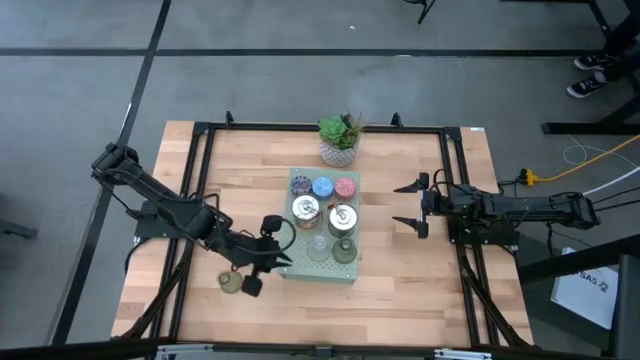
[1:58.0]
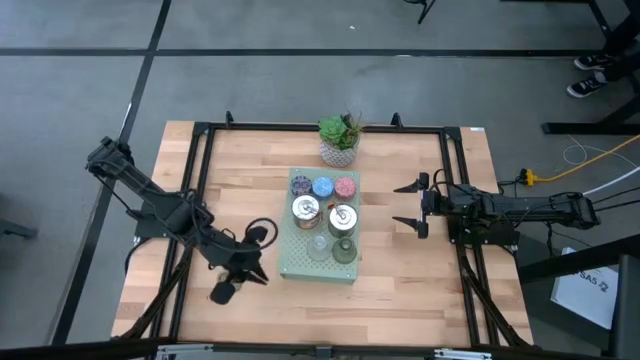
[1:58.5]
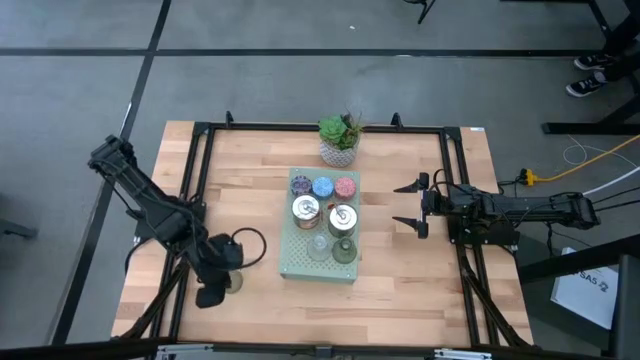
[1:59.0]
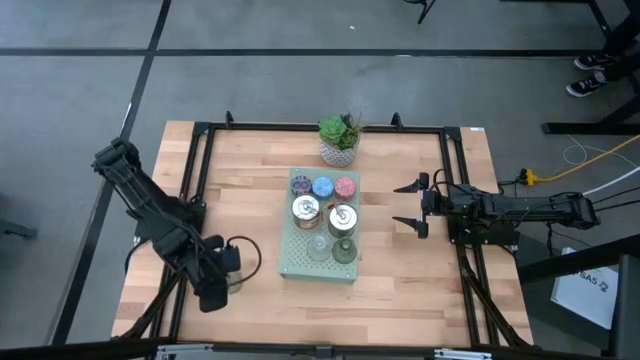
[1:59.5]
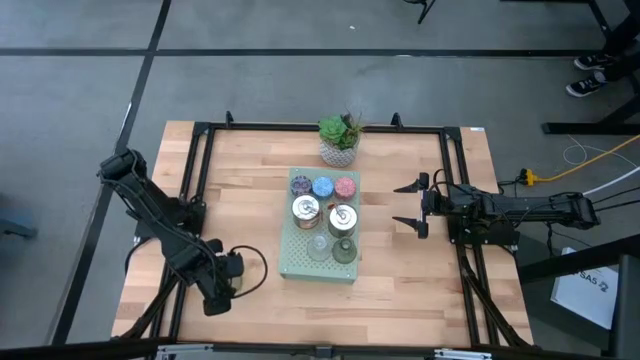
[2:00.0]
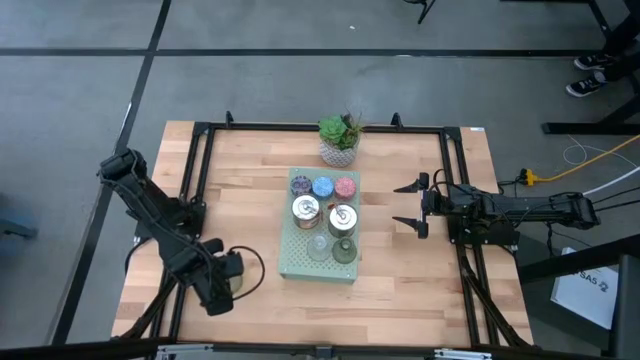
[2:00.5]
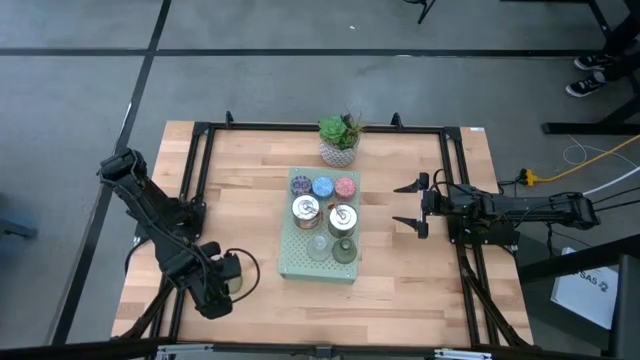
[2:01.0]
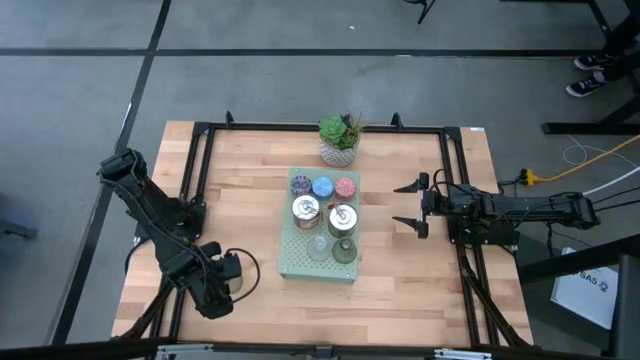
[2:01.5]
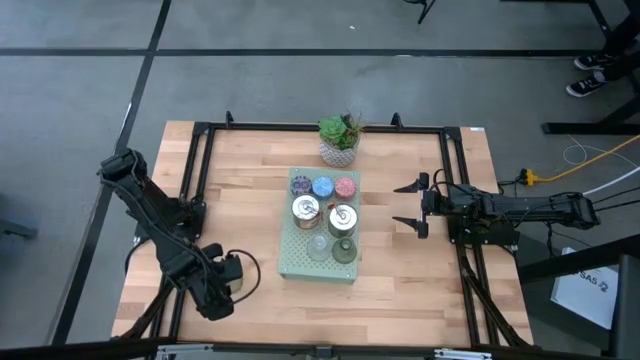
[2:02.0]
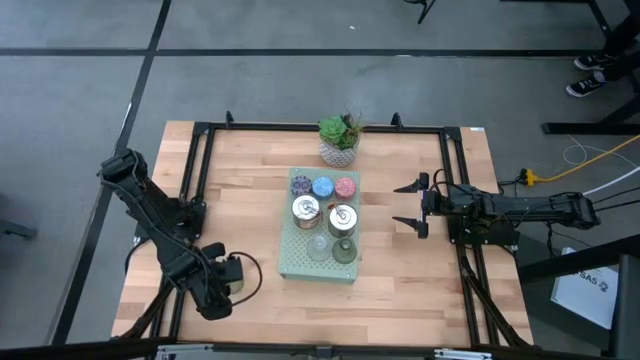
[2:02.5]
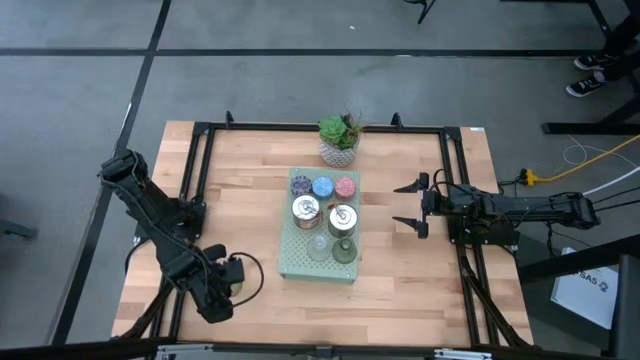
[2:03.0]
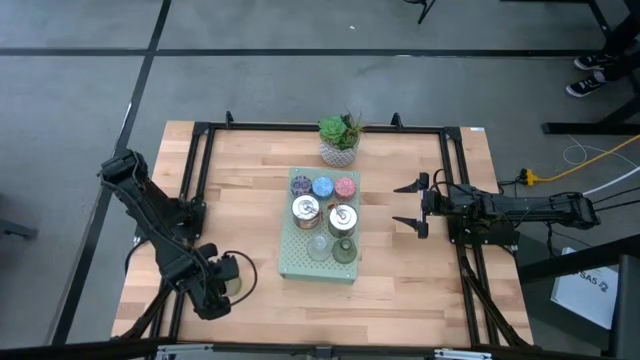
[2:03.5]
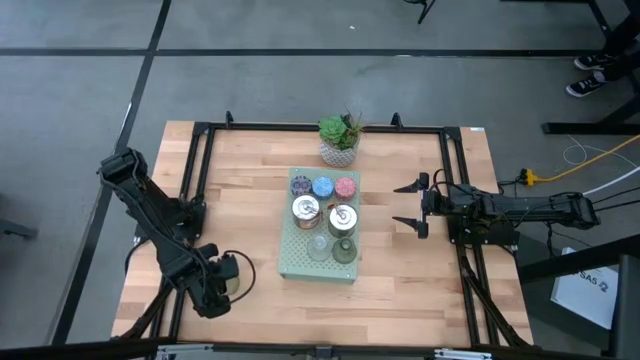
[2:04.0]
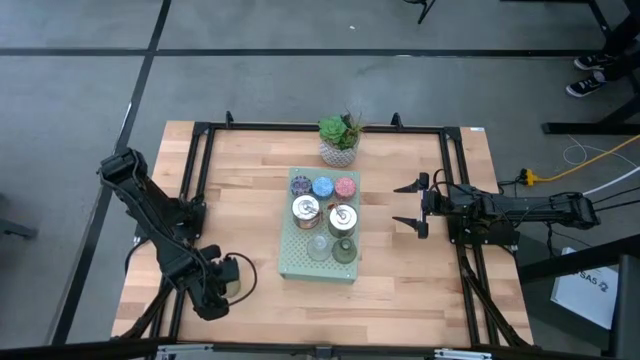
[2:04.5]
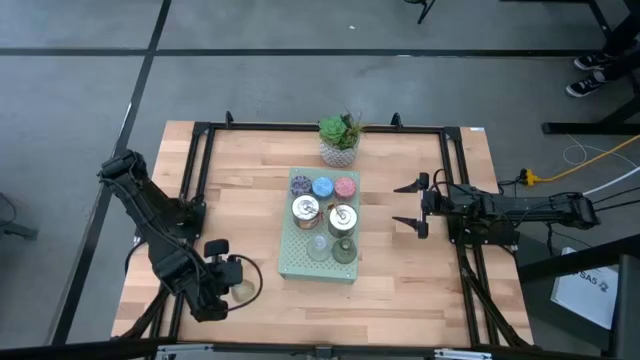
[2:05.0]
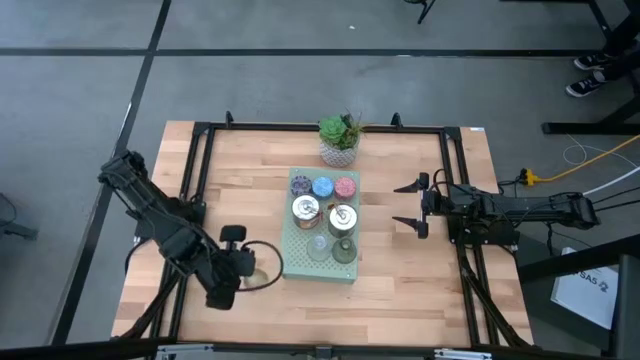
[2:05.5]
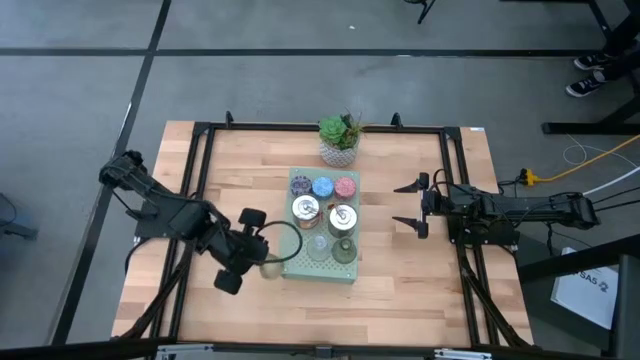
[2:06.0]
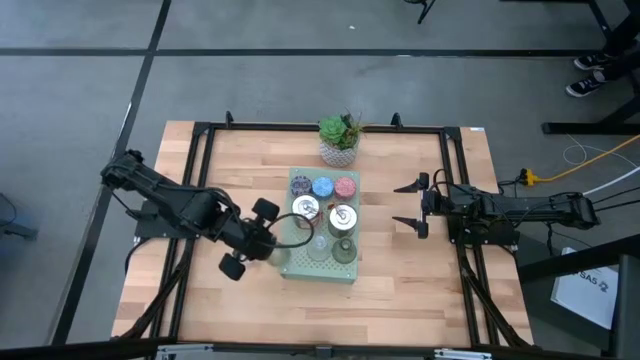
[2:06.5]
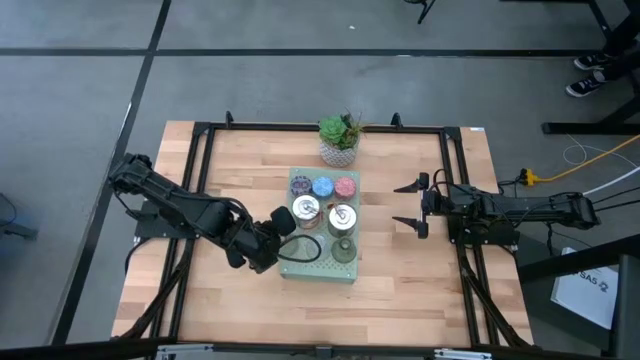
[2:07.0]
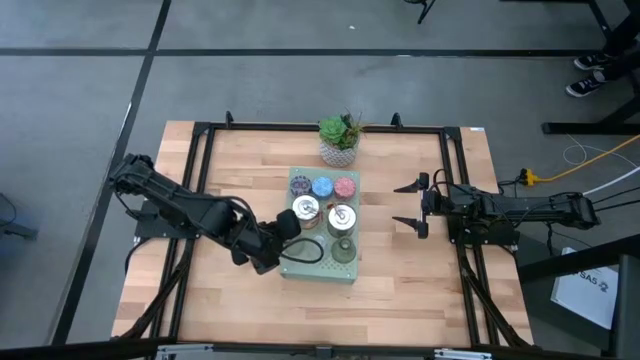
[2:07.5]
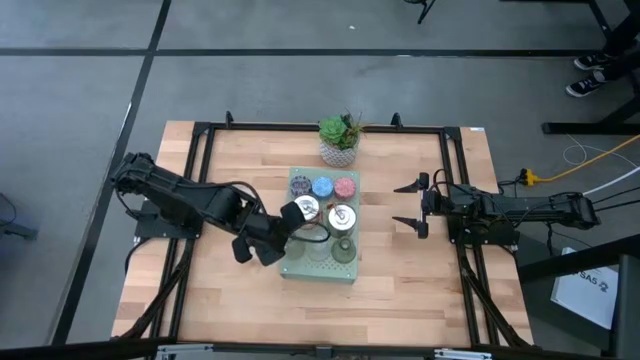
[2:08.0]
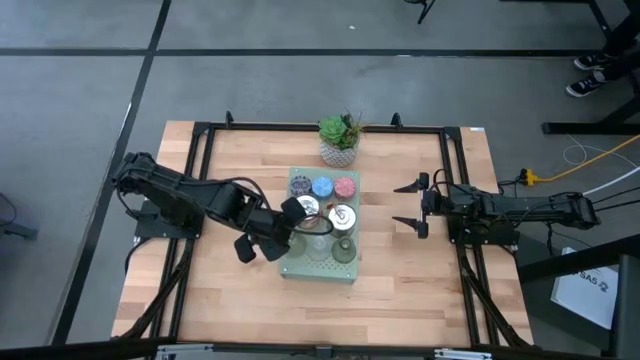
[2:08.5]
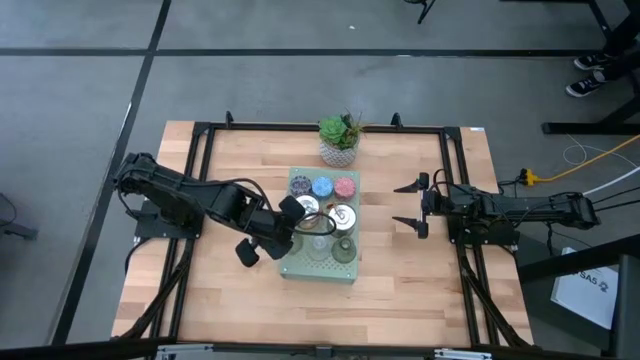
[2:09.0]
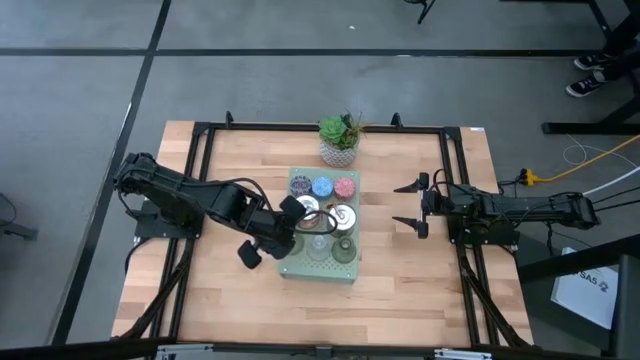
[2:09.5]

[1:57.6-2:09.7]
Task: Pick & Place candle stick holders
Put the green vase candle holder on the shelf

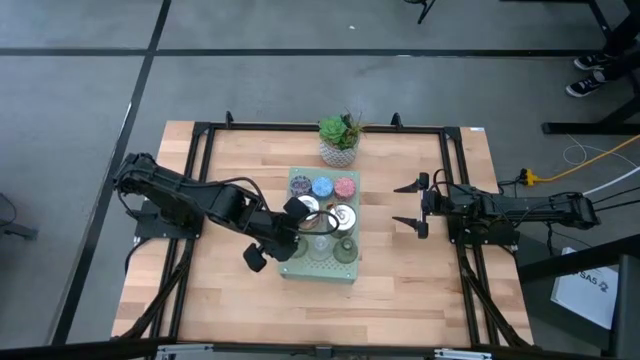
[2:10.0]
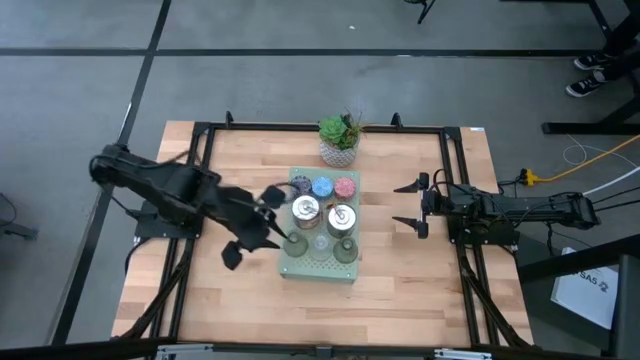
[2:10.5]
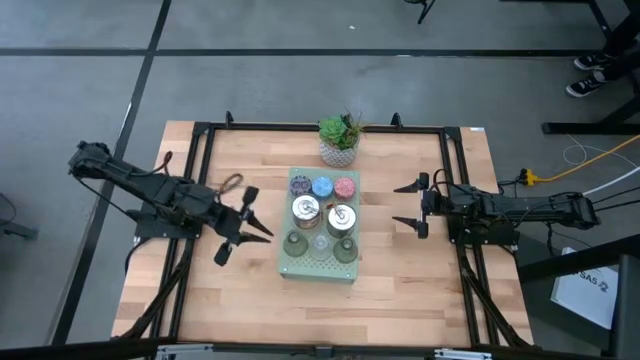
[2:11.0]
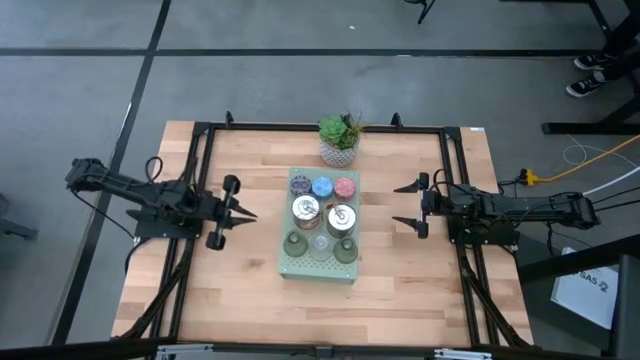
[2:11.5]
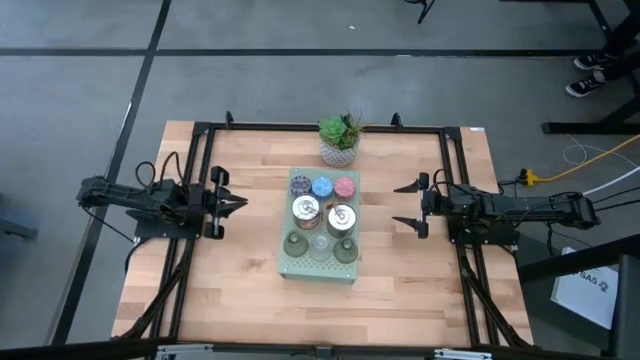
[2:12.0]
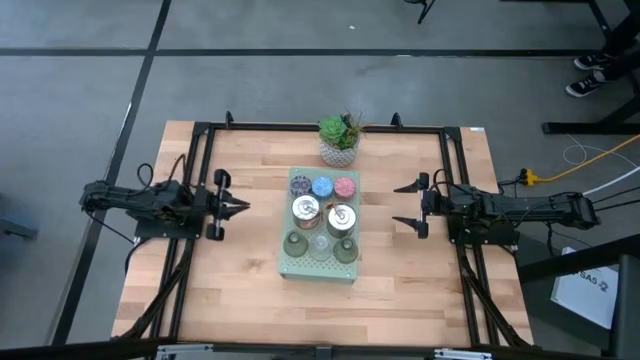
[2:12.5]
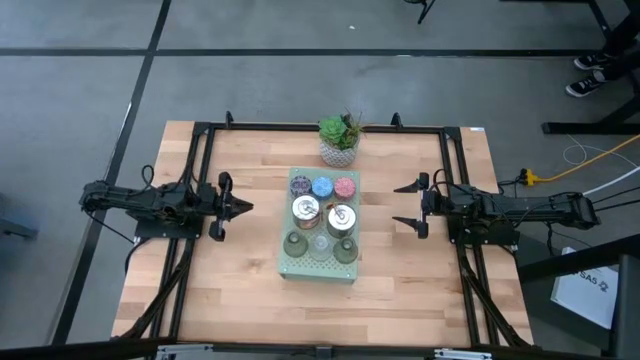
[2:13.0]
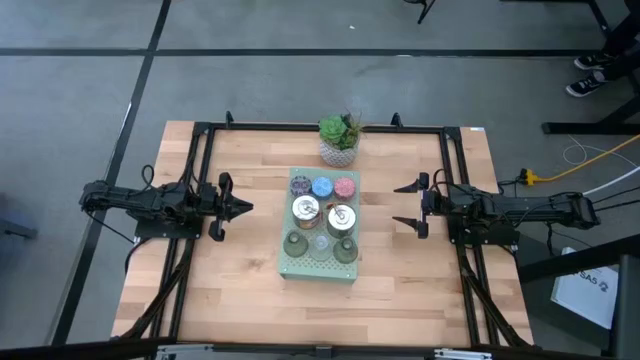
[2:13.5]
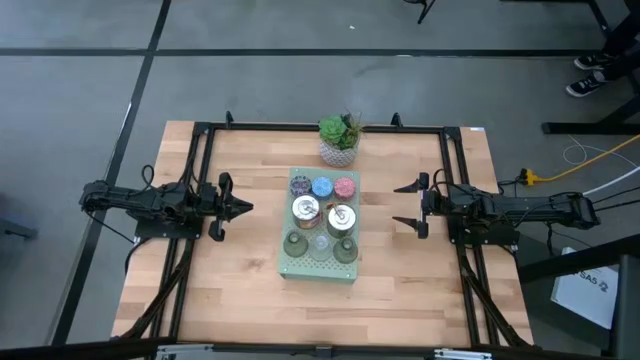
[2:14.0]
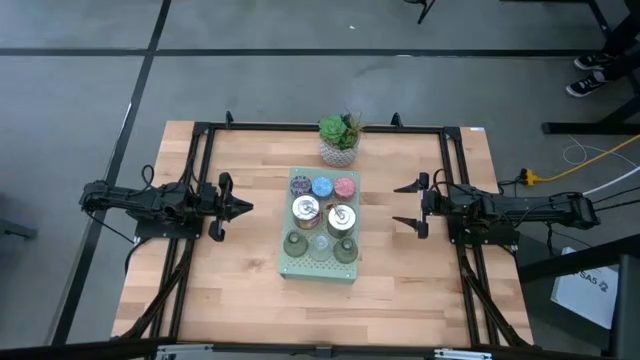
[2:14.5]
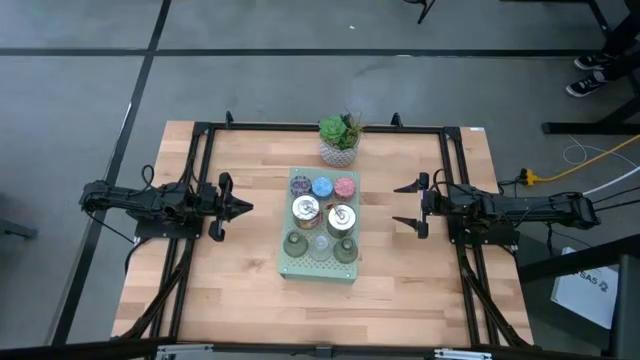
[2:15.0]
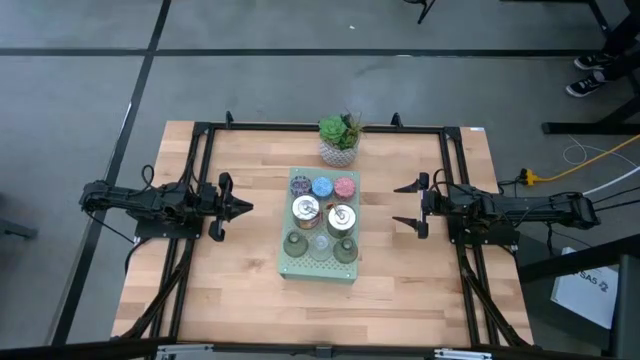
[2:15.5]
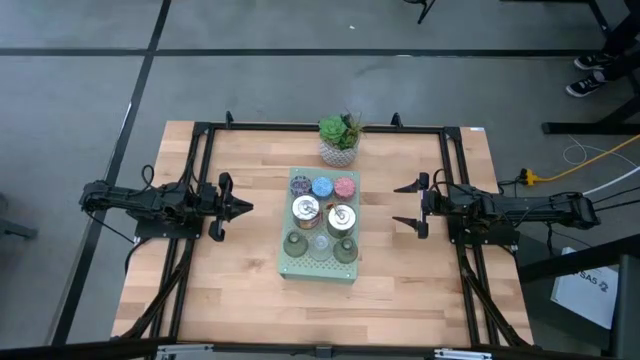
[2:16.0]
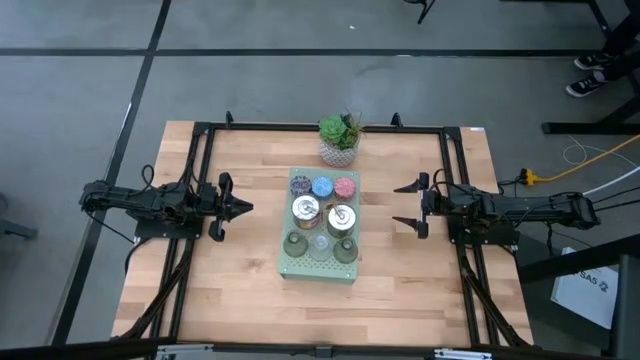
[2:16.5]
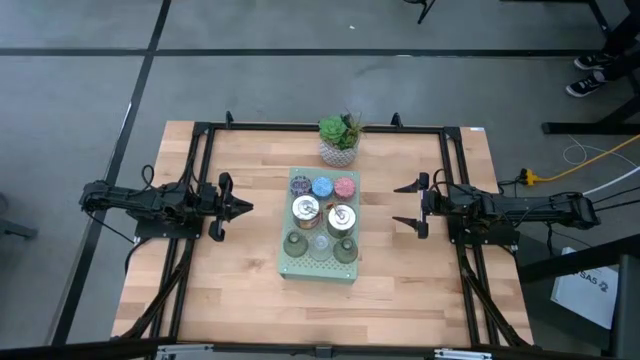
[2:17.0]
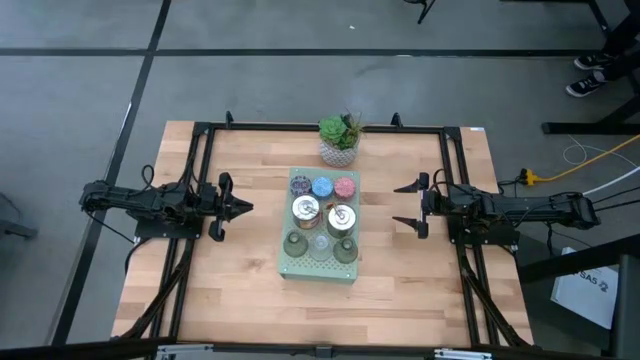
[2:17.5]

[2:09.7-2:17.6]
Return to Home Position

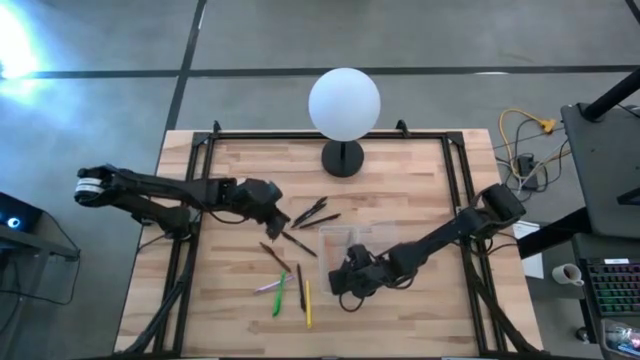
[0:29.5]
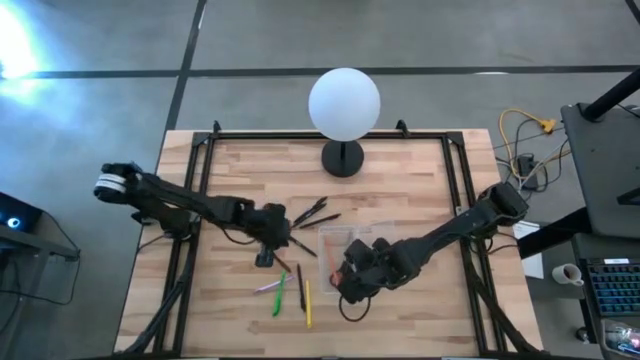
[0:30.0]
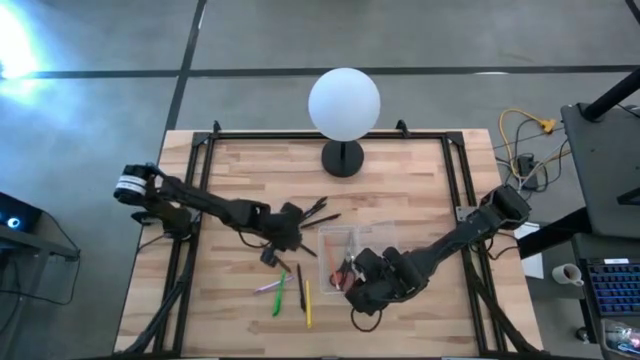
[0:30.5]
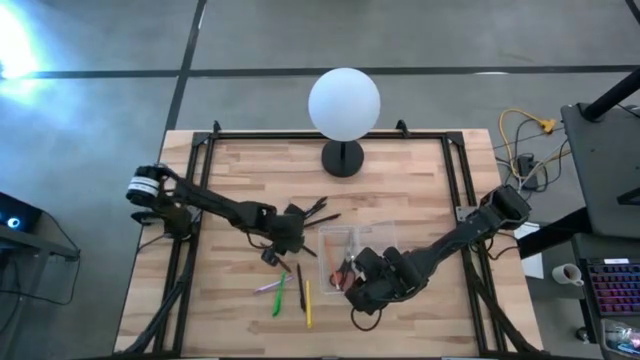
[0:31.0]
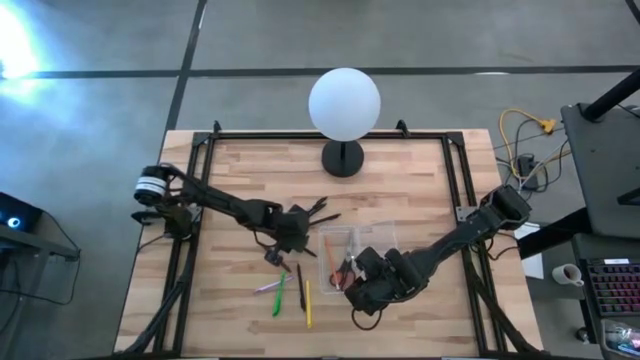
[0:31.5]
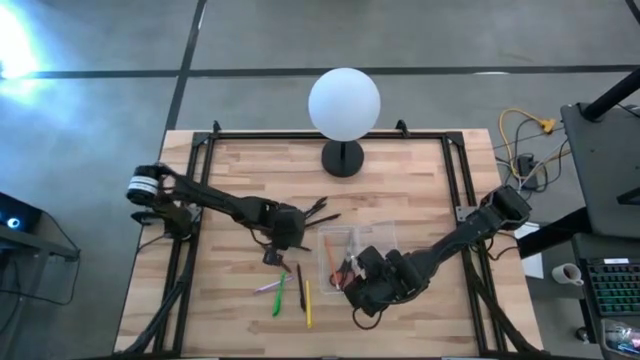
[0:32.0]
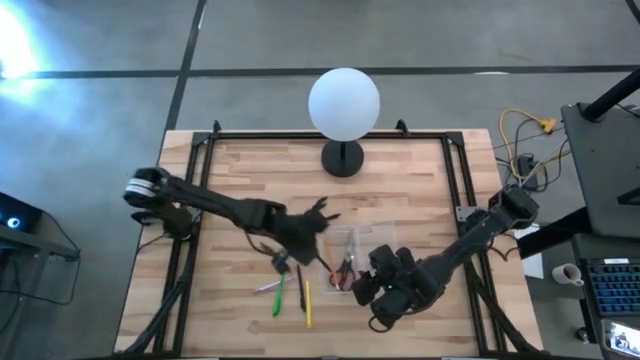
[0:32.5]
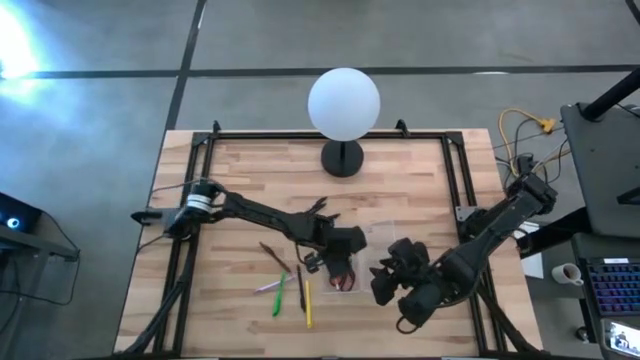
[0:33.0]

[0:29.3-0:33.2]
Task: Pick & place school supplies into a supply box
Put the black pen into the transparent supply box
